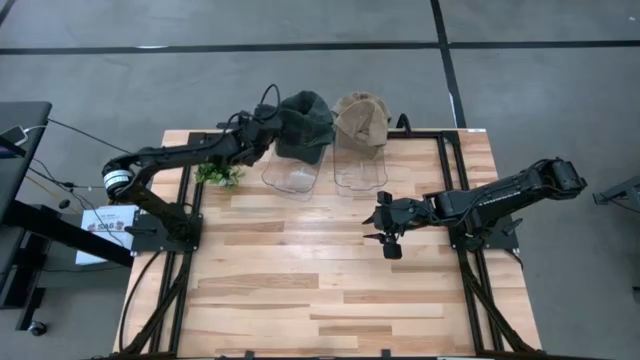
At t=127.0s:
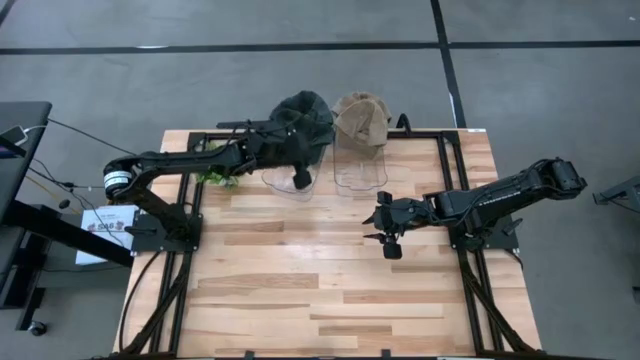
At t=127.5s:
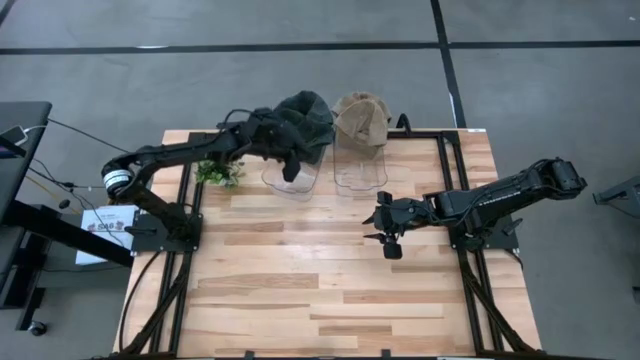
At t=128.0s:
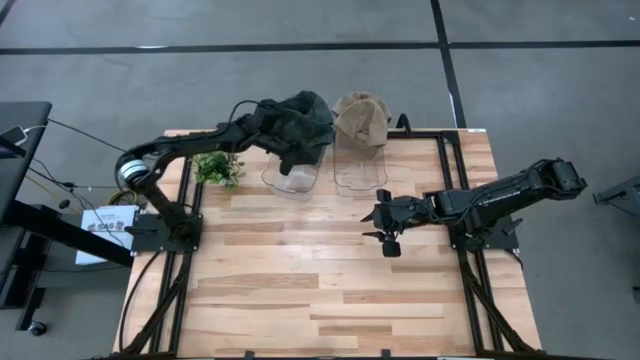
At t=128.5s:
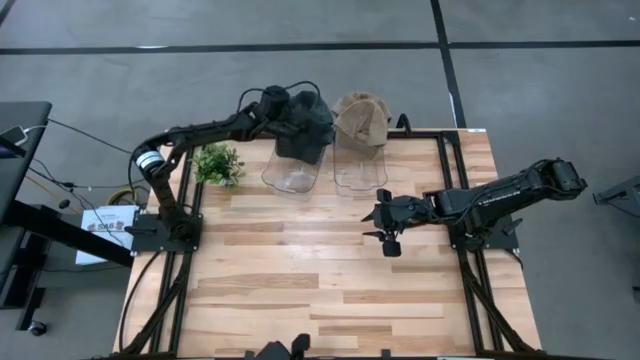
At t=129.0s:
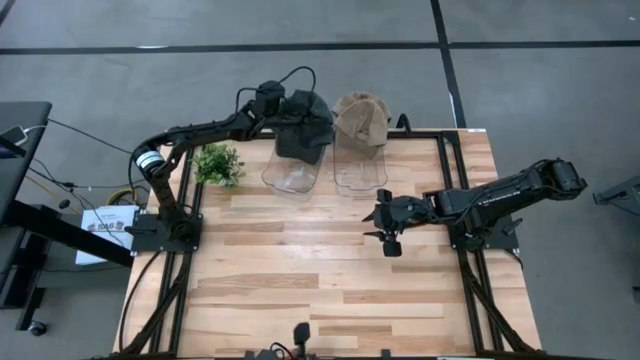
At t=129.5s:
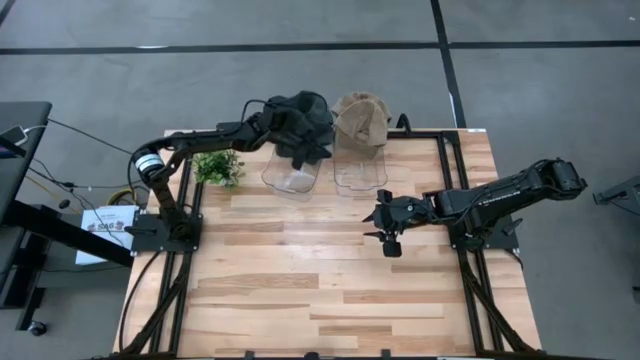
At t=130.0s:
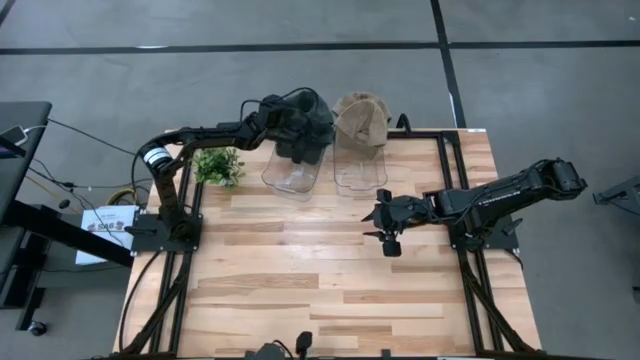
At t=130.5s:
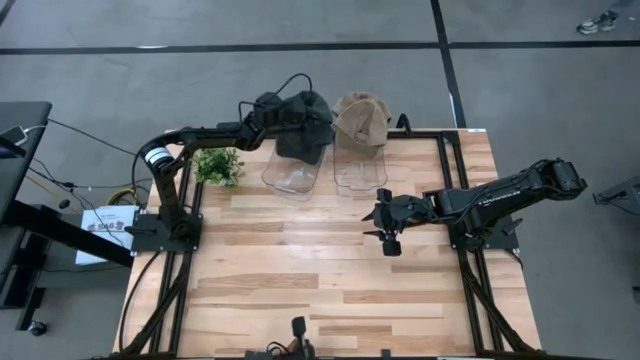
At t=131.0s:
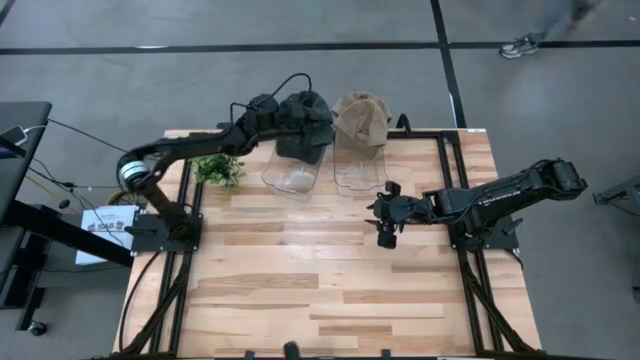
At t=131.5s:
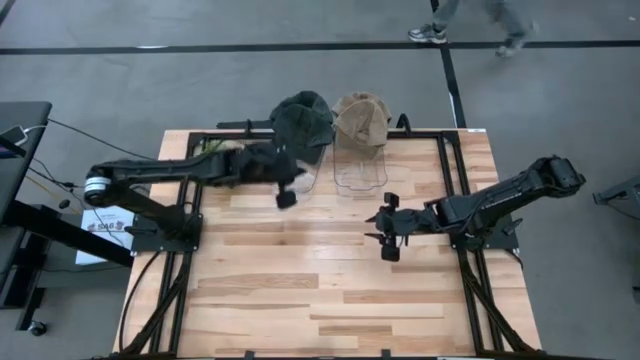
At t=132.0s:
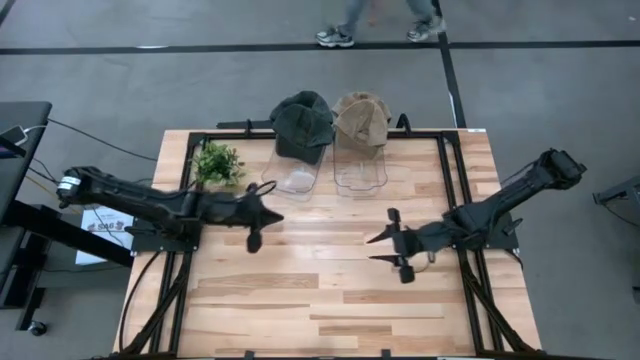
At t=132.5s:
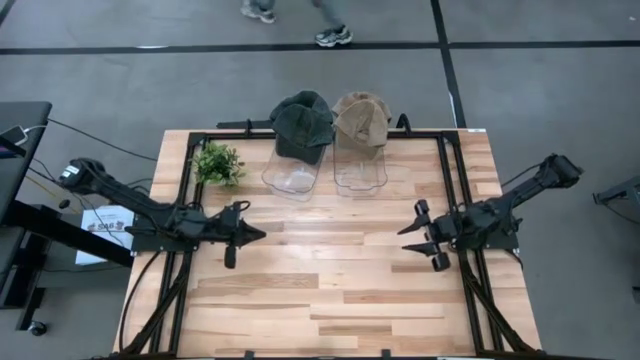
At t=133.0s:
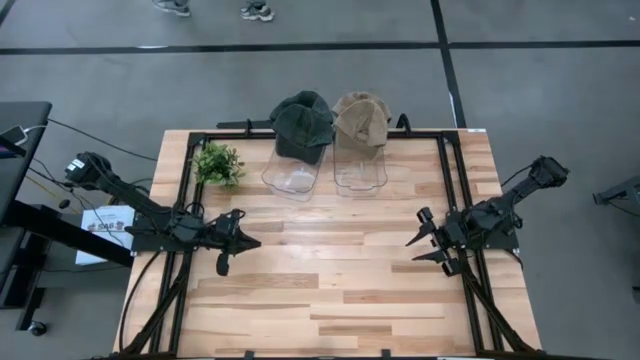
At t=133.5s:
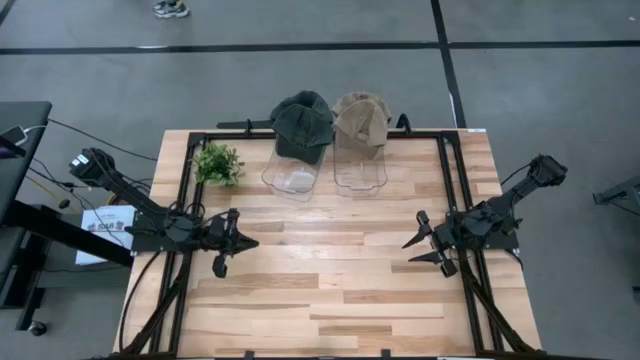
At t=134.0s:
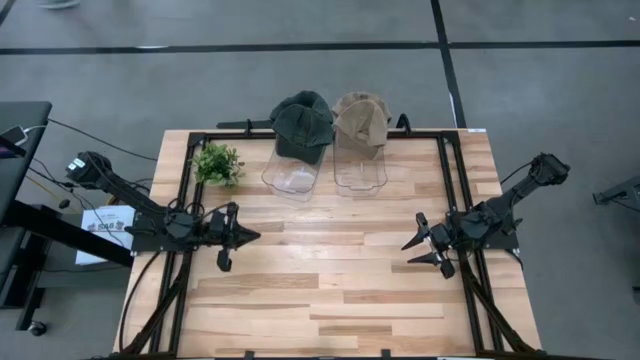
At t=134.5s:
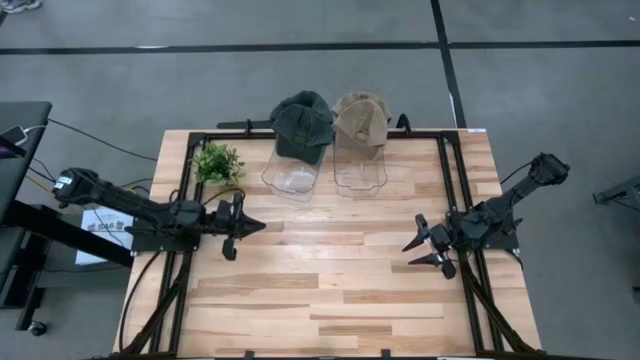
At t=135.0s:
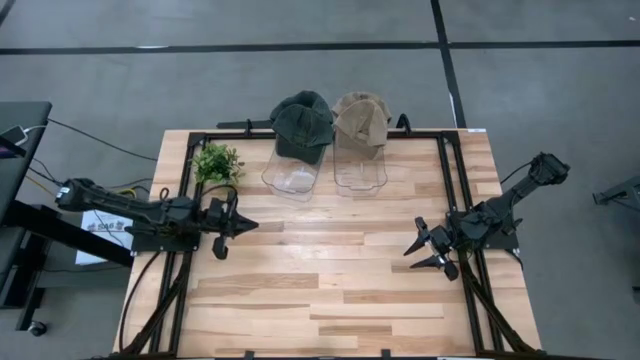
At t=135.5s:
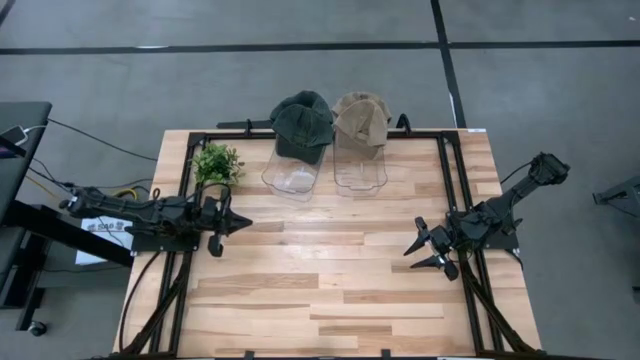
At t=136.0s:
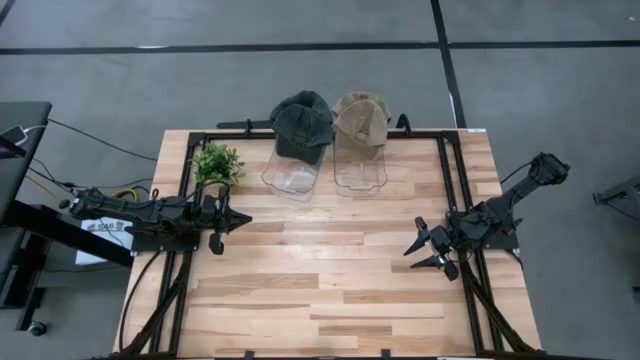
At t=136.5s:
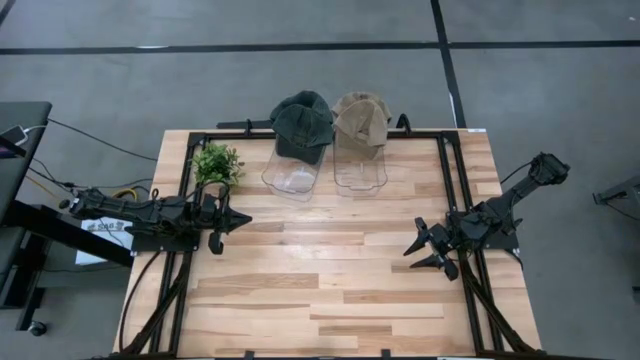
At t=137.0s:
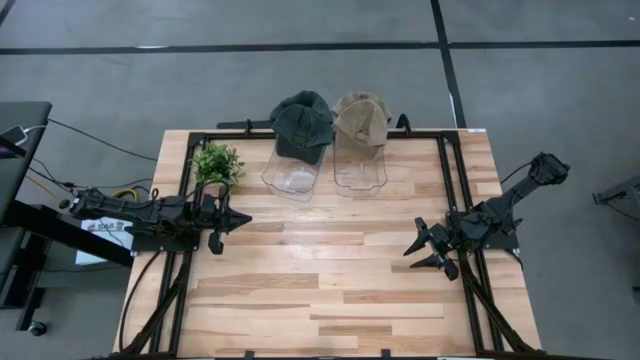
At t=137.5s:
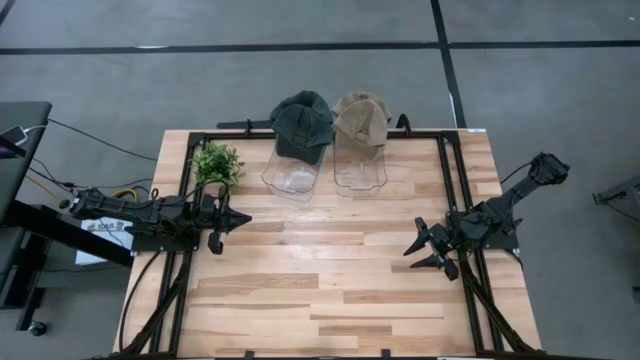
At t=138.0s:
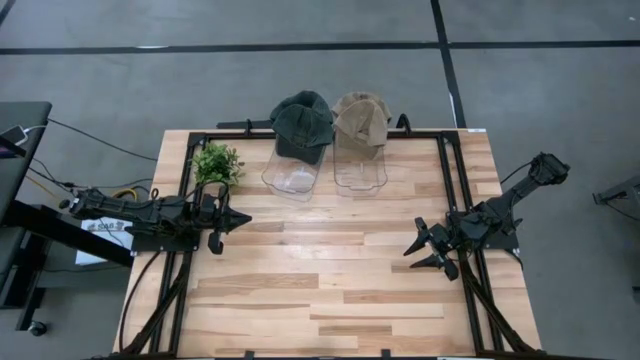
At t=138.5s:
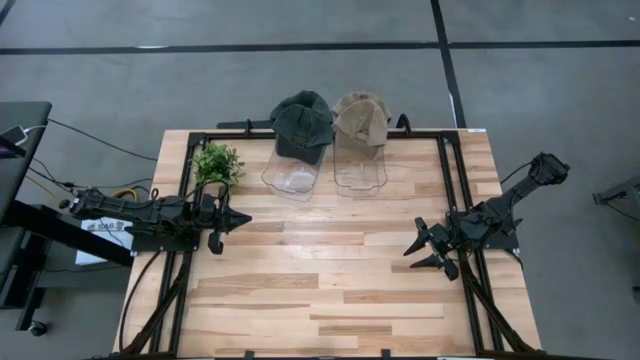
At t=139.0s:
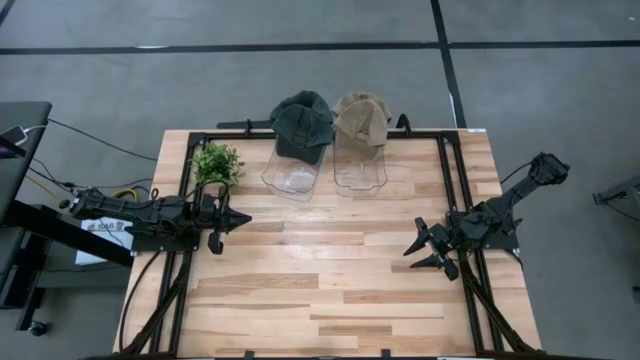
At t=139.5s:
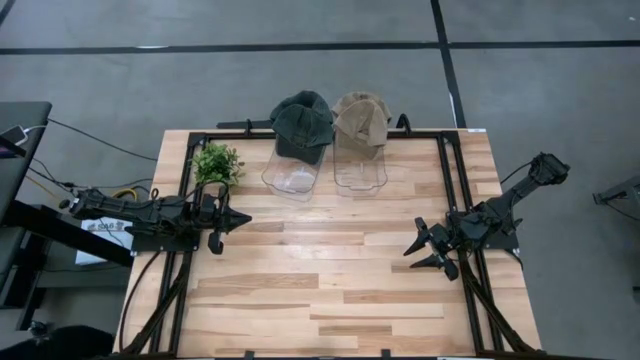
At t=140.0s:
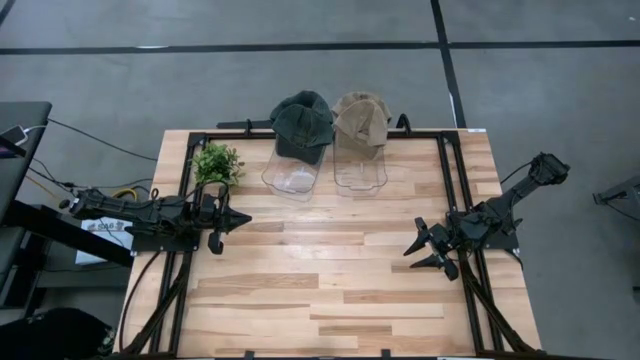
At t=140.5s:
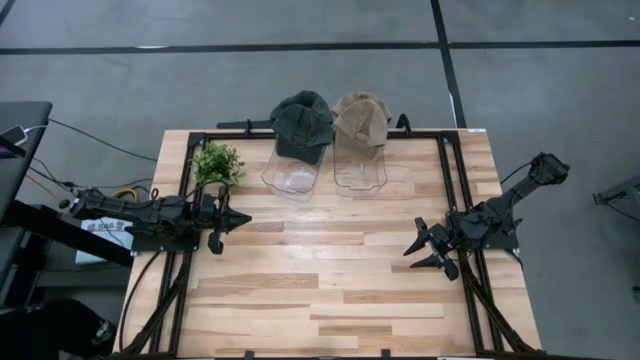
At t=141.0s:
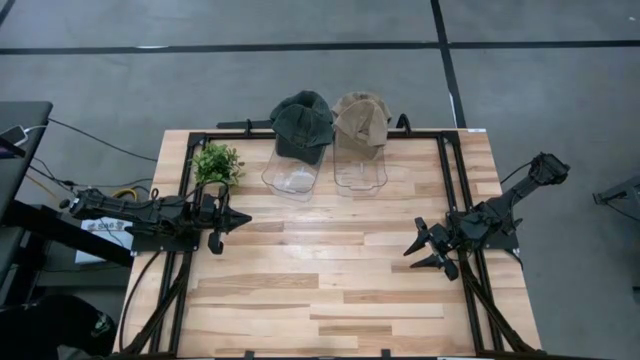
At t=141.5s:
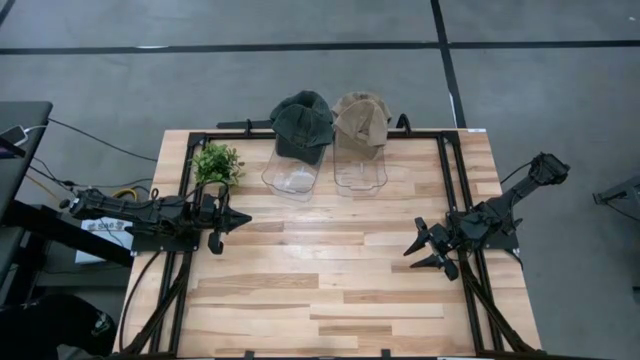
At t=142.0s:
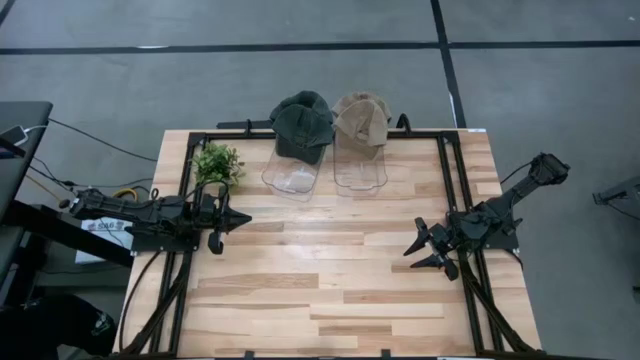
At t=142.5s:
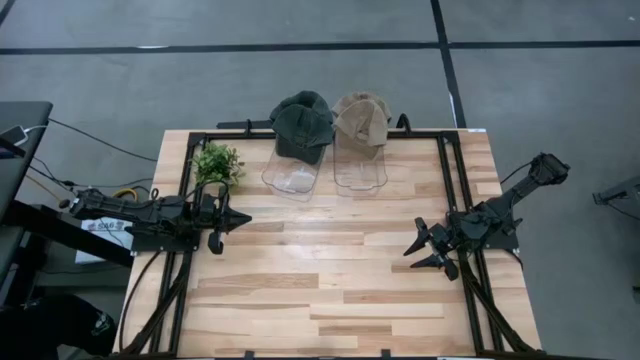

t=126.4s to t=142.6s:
Task: Pick & Place hat
Return to Home Position

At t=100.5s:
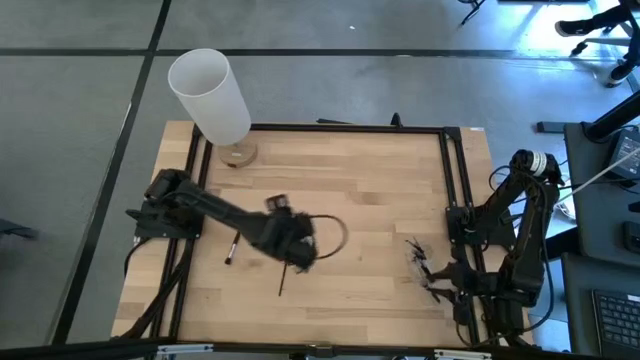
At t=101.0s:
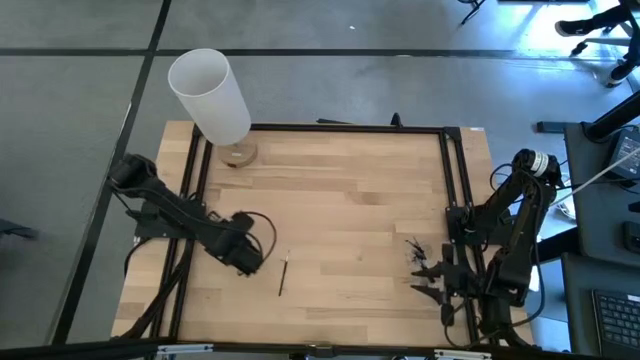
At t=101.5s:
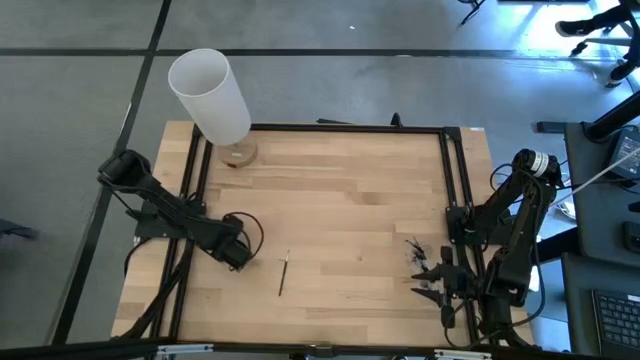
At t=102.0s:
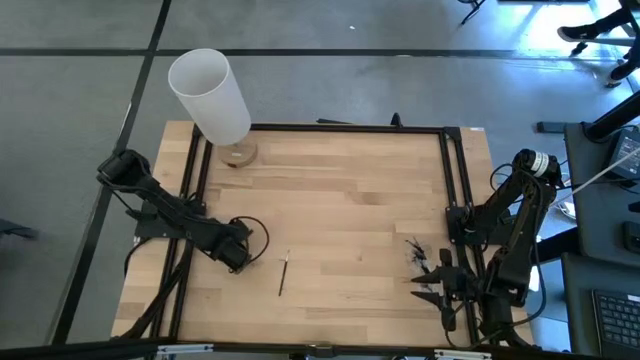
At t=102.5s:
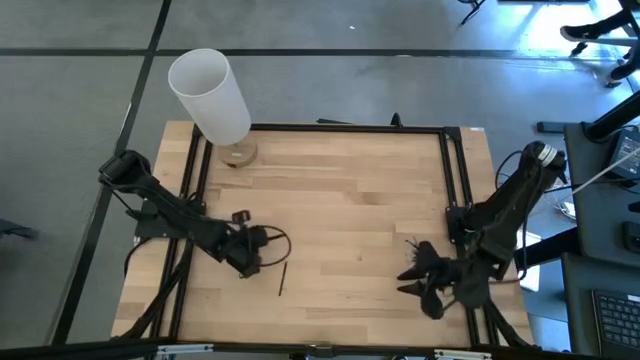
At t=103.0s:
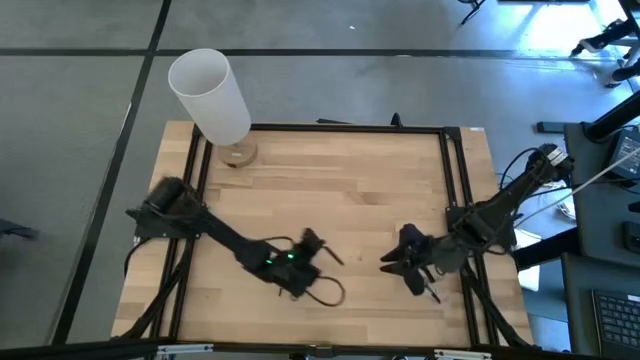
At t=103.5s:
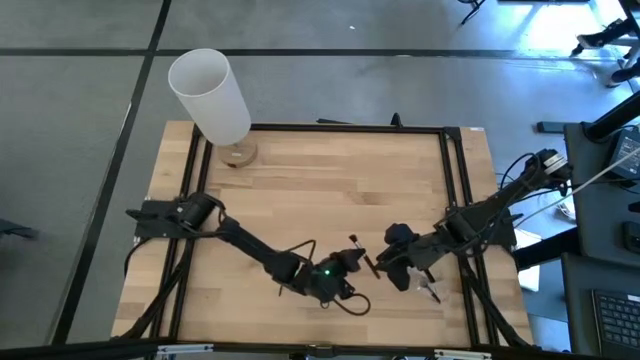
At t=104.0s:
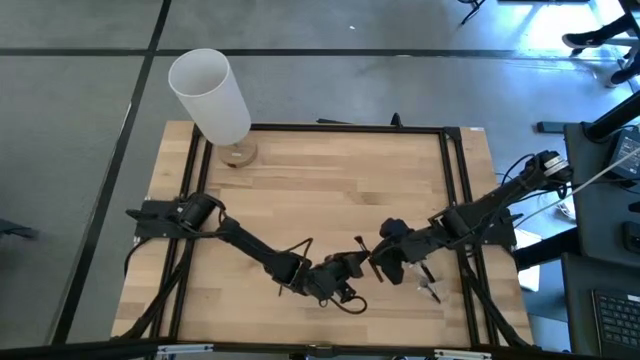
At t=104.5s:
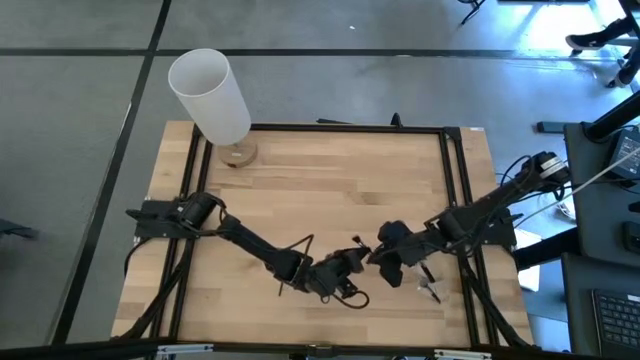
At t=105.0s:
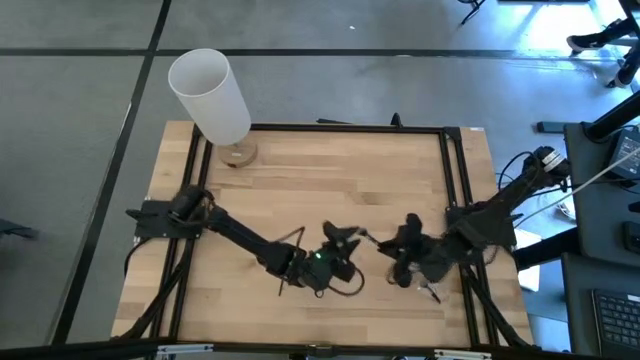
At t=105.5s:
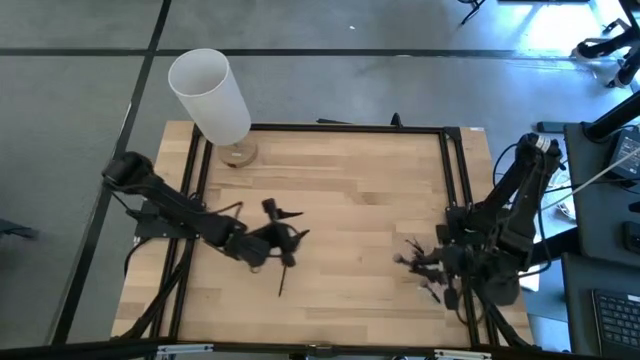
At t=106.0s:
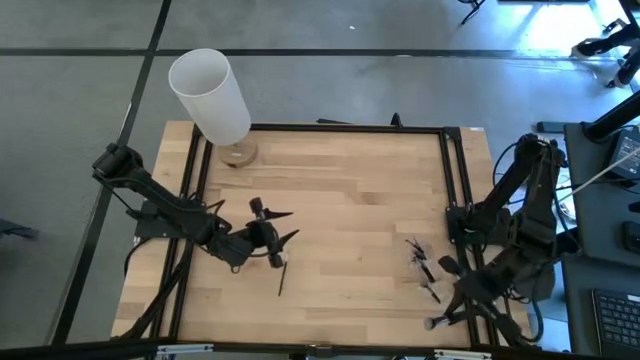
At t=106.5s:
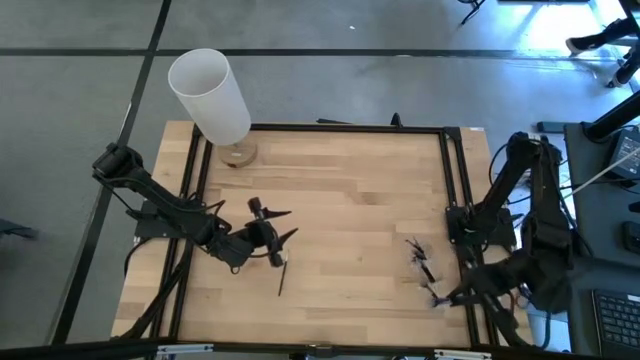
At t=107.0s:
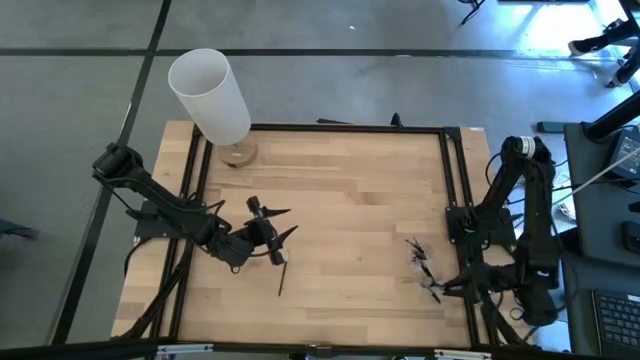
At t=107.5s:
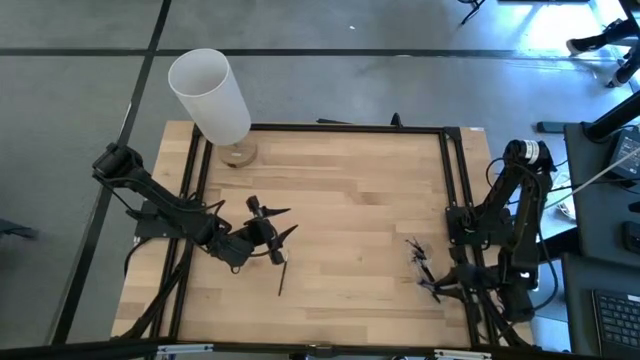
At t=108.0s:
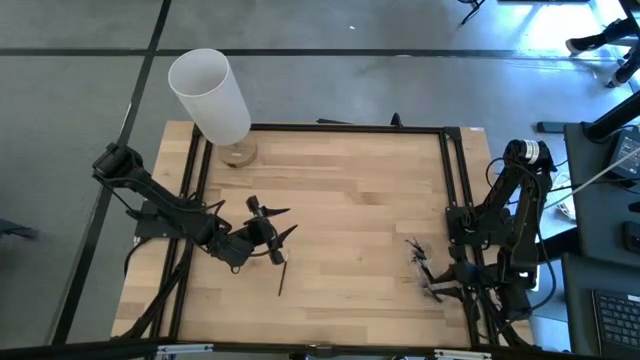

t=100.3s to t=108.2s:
Task: Put items in baskets/containers
Put the contour brush into the transparent organizer
